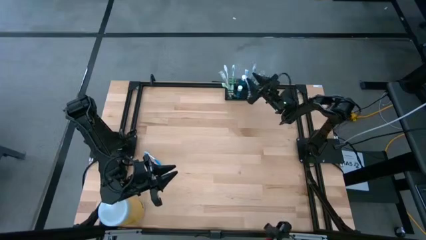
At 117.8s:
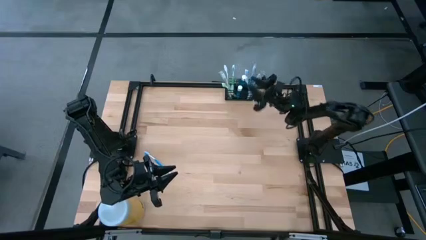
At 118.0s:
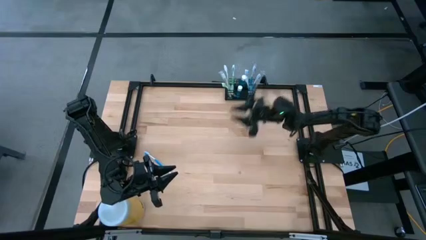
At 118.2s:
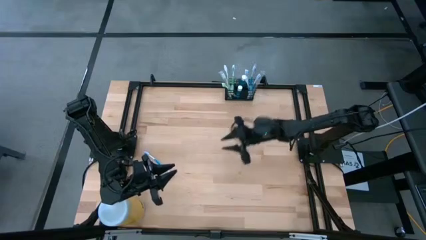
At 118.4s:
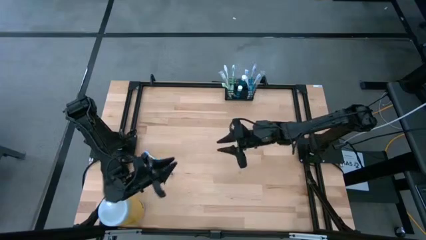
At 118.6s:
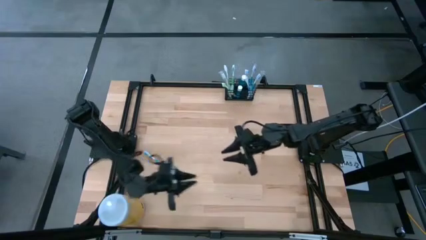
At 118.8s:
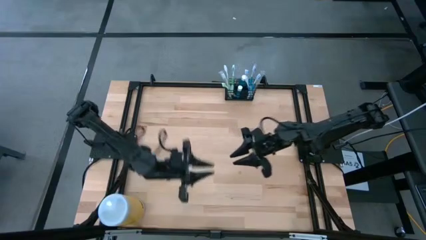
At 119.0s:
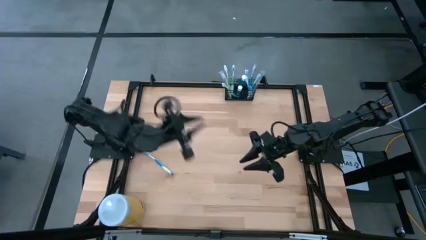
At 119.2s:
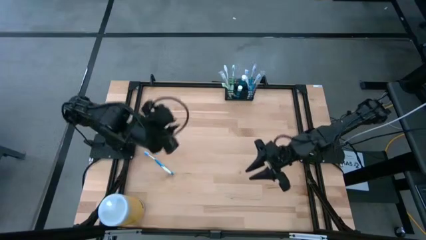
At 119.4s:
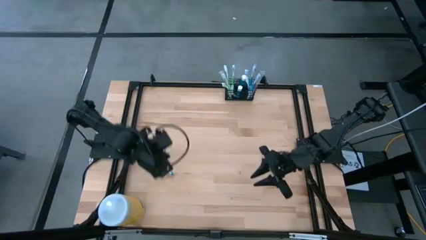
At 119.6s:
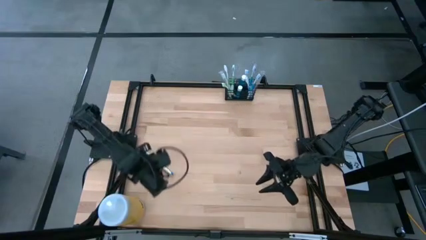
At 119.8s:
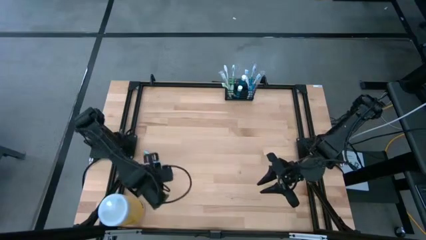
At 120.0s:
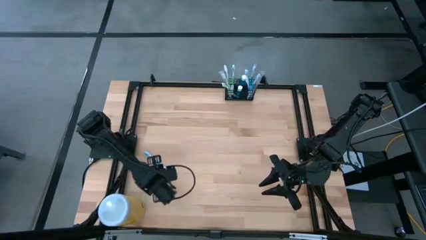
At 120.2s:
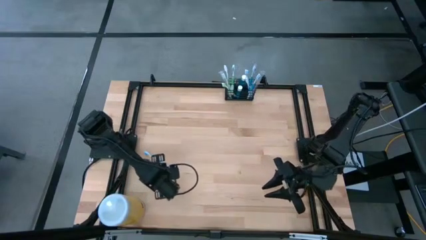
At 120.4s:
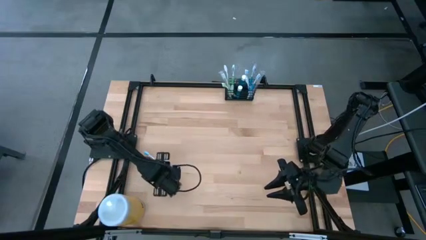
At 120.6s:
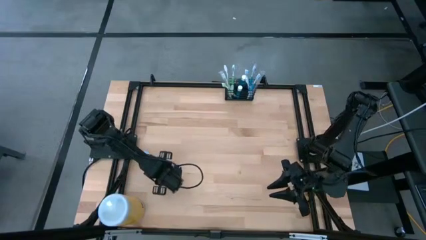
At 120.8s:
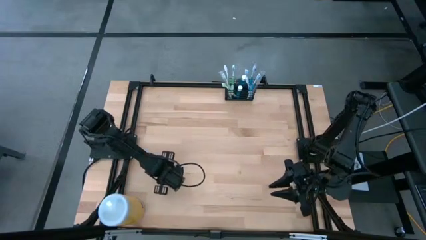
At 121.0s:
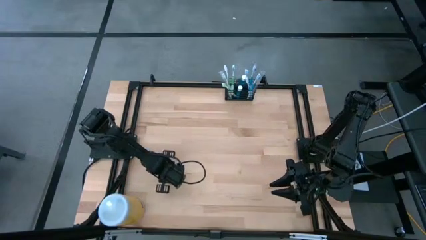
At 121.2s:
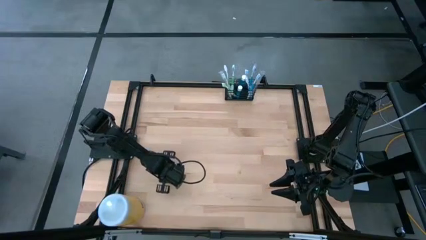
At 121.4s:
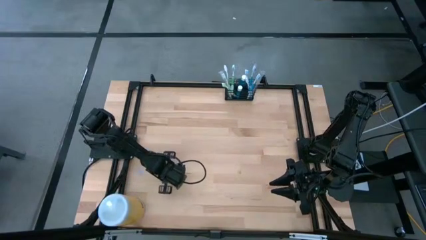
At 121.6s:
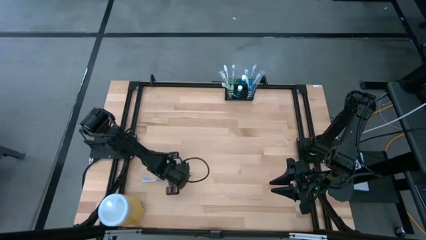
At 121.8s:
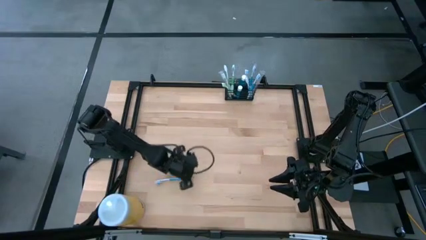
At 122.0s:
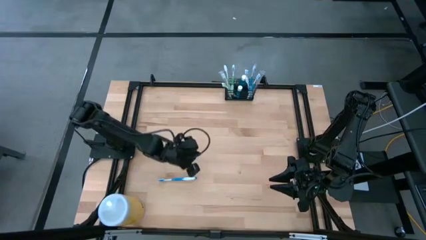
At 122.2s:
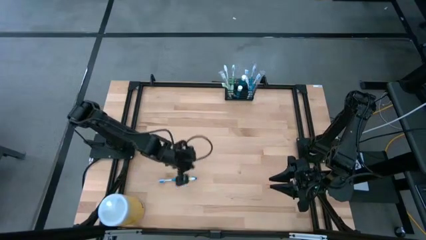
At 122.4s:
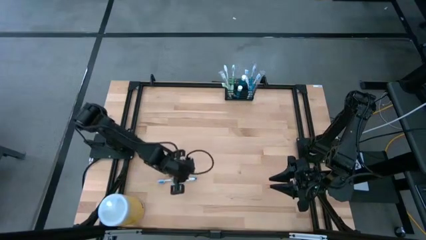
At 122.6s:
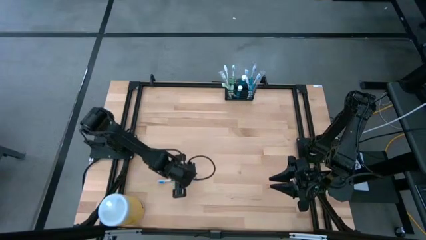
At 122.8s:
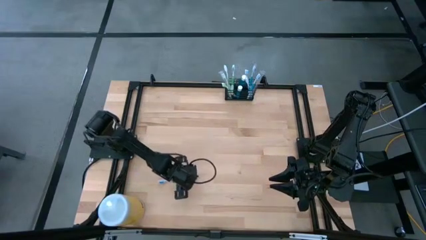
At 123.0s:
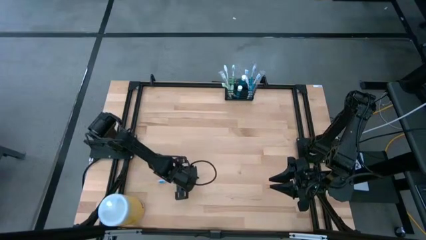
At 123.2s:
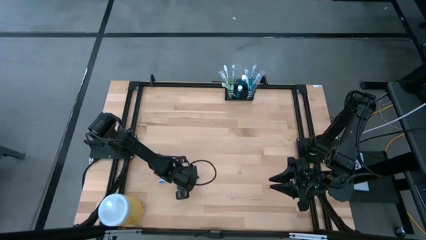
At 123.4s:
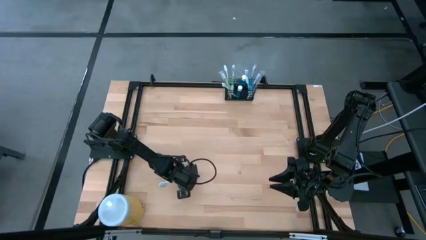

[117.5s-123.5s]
Task: Pick & Place toothbrushing station
Put the blue toothbrush into the black organizer

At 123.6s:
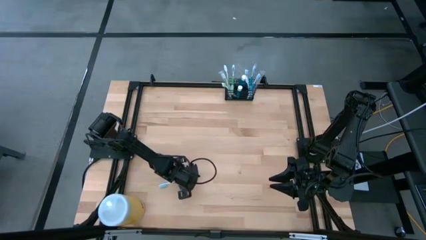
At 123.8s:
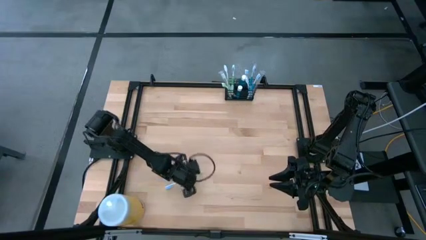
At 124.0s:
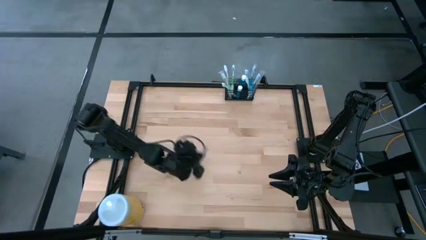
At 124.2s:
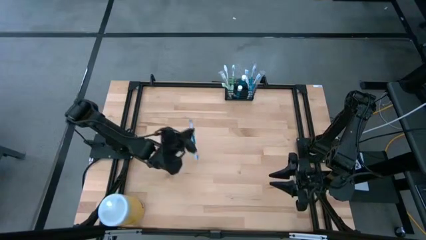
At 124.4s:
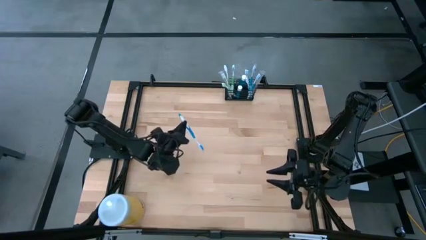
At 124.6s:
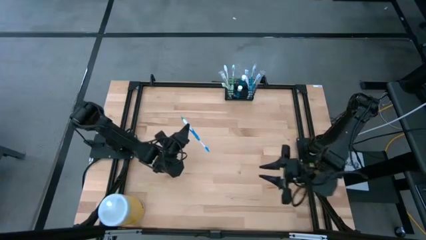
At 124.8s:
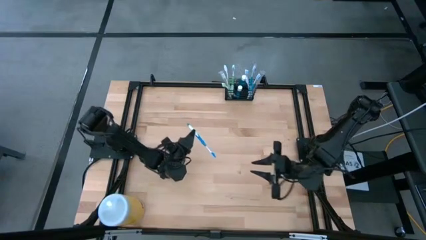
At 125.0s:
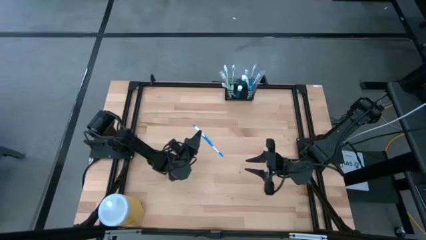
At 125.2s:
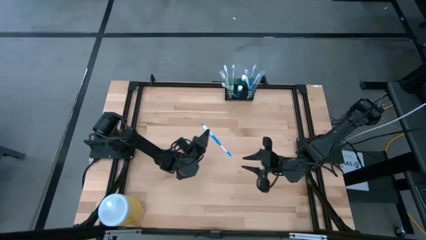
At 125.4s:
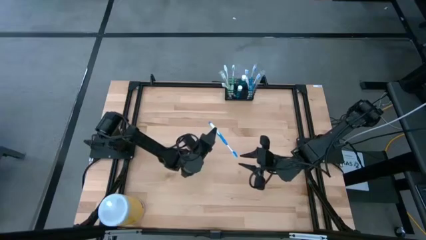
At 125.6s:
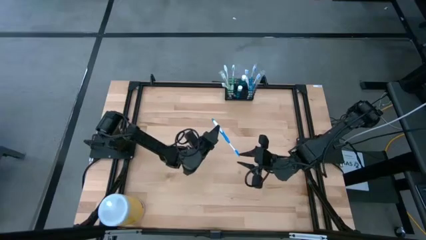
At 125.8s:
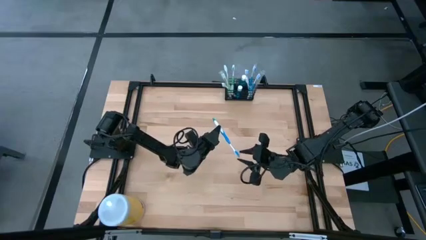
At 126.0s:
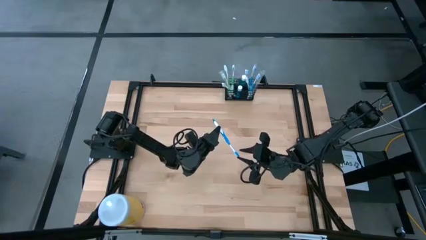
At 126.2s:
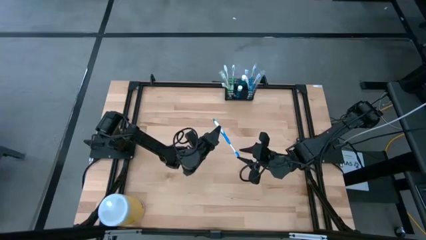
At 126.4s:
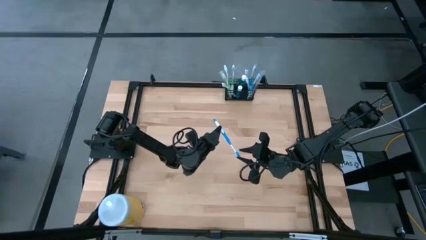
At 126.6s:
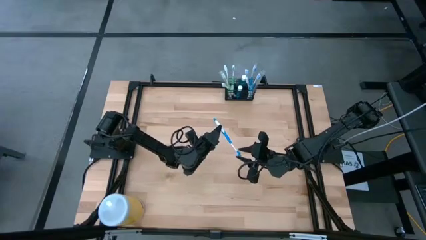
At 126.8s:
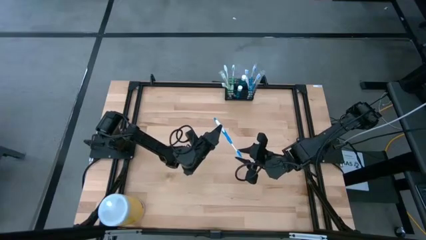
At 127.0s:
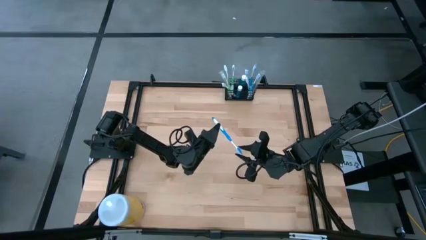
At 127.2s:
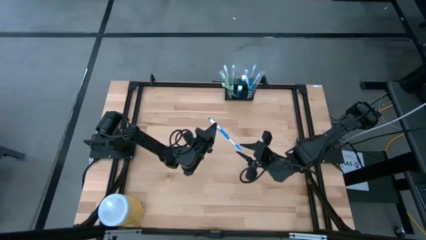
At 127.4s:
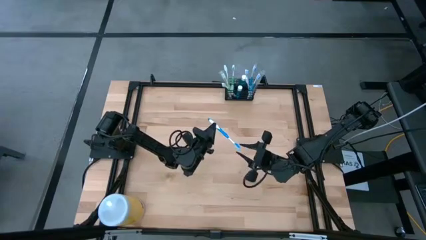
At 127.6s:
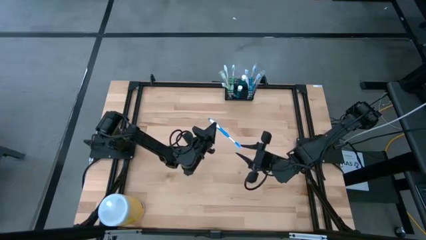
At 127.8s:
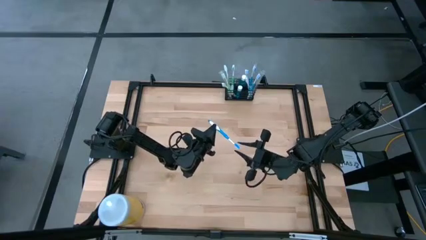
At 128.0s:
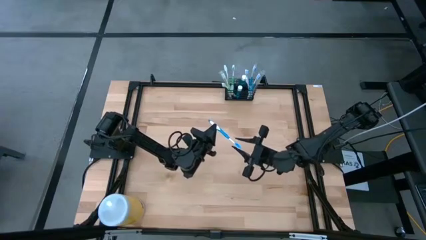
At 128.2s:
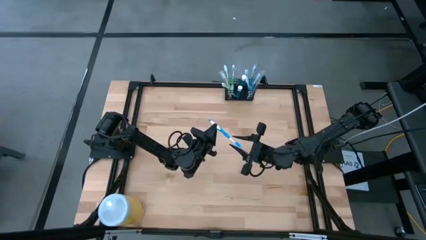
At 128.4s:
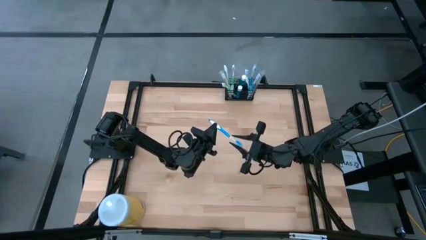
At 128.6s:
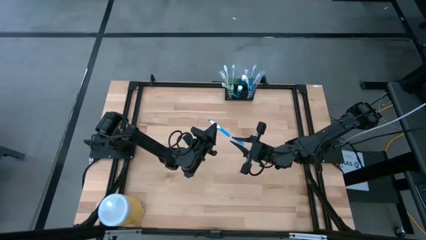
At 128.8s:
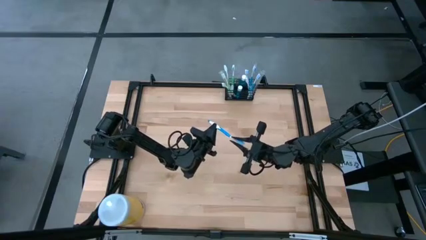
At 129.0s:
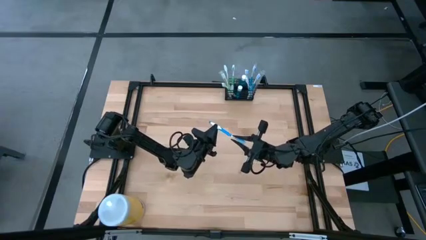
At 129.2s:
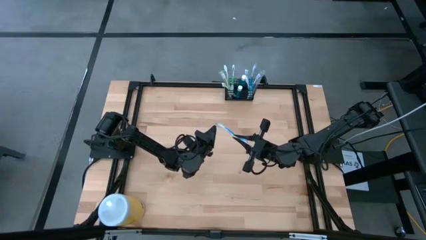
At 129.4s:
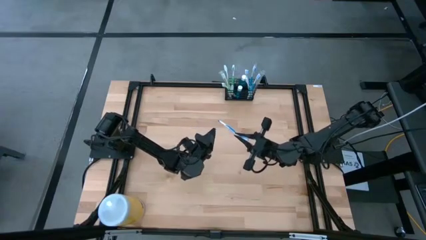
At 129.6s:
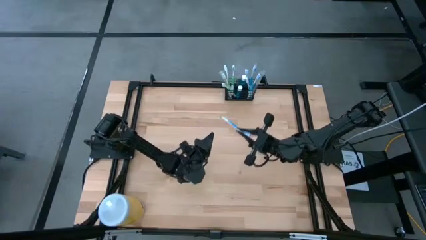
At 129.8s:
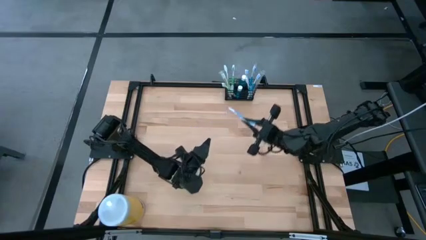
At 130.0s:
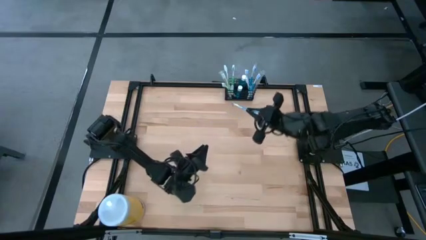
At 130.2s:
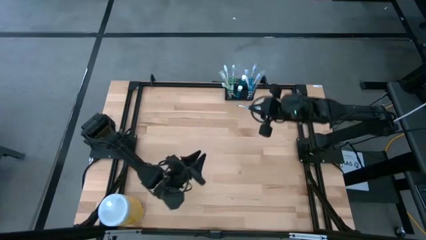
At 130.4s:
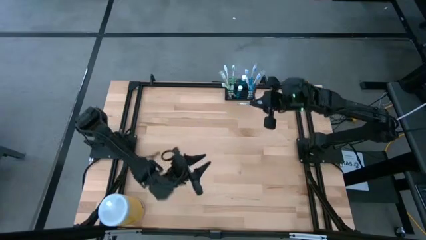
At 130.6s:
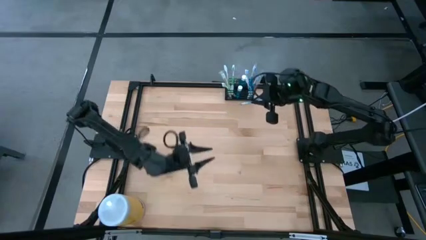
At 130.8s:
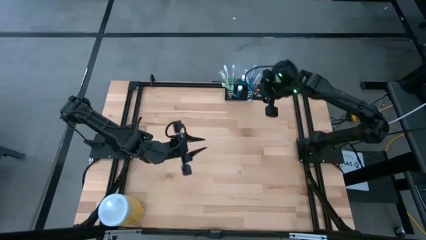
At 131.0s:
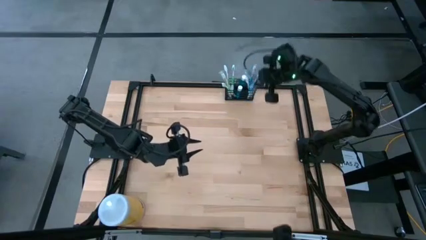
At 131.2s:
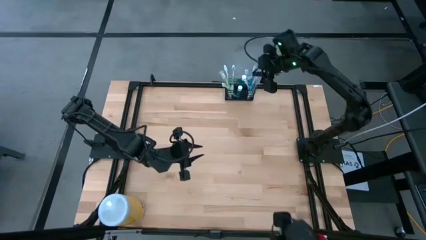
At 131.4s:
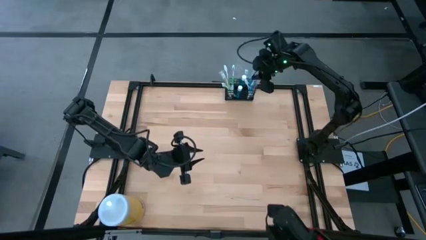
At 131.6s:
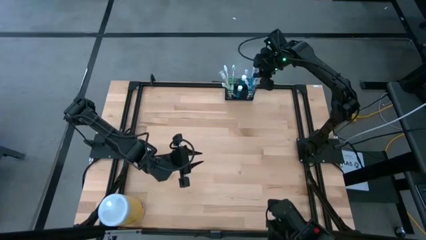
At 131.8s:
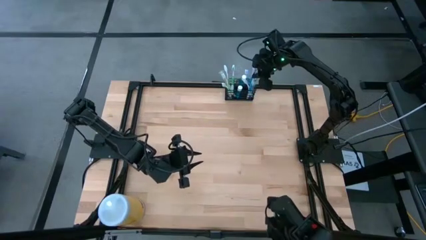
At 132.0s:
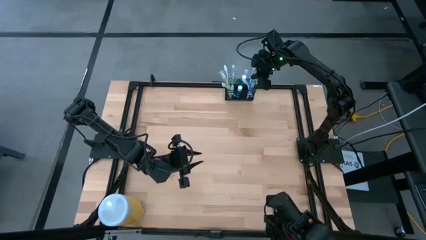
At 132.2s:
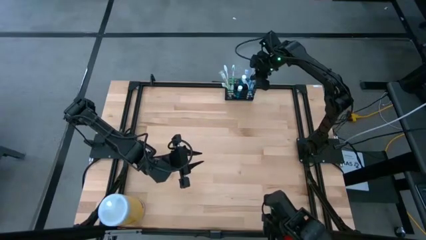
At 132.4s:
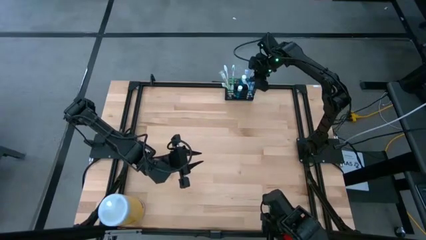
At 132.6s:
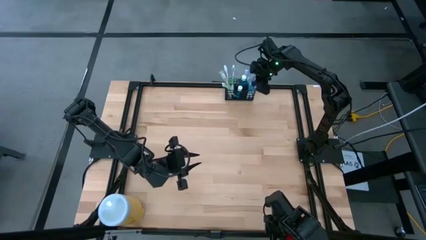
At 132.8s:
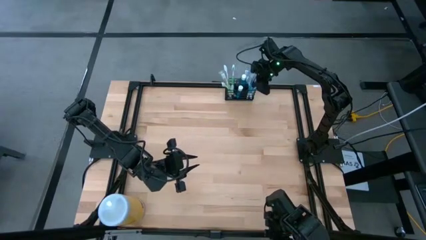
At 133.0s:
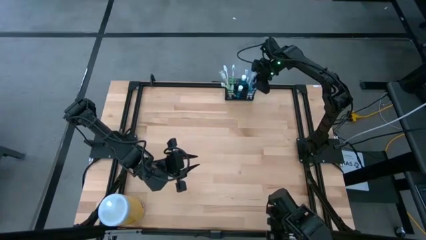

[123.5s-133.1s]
Put the blue toothbrush into the black organizer
